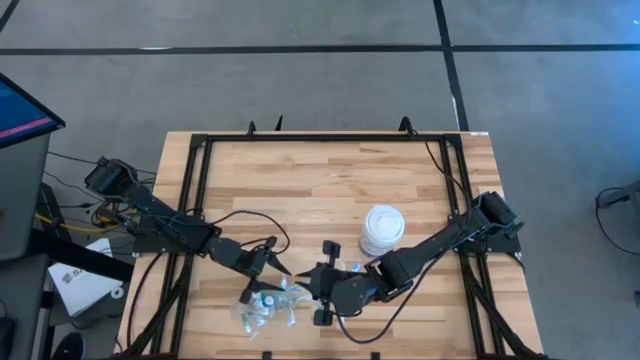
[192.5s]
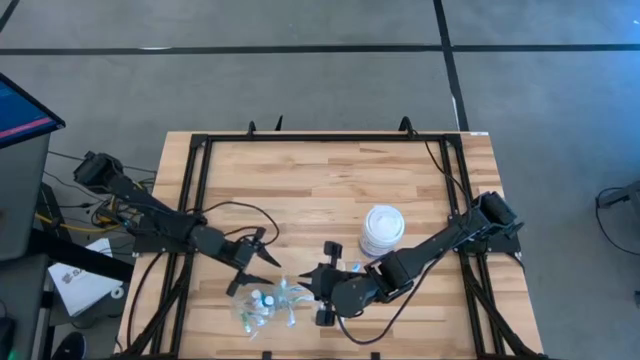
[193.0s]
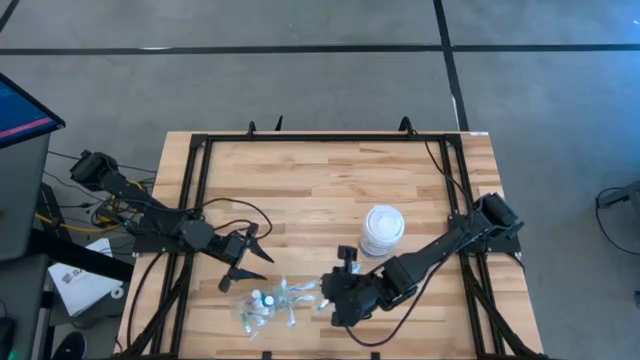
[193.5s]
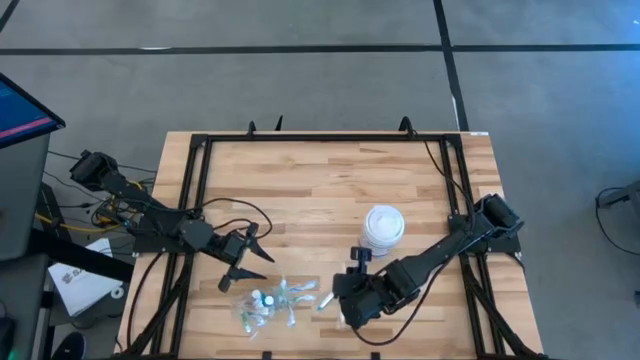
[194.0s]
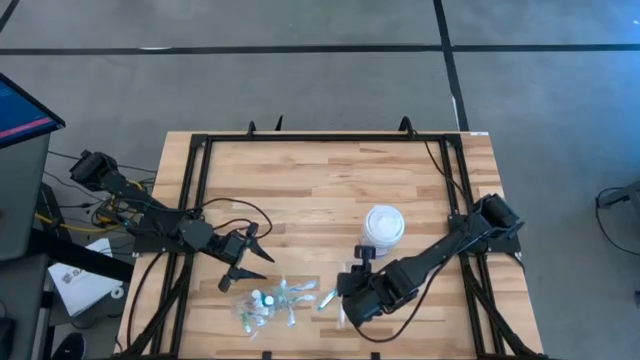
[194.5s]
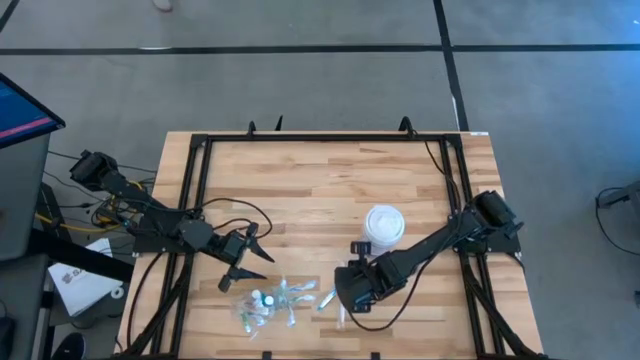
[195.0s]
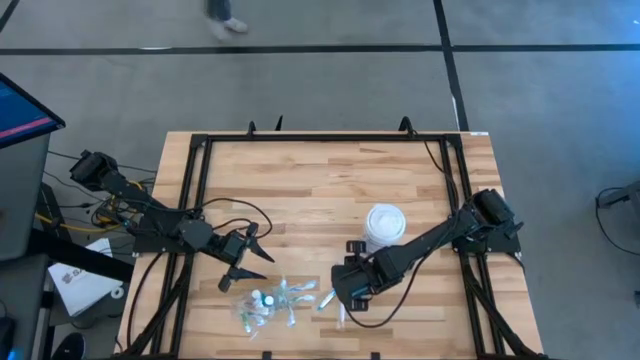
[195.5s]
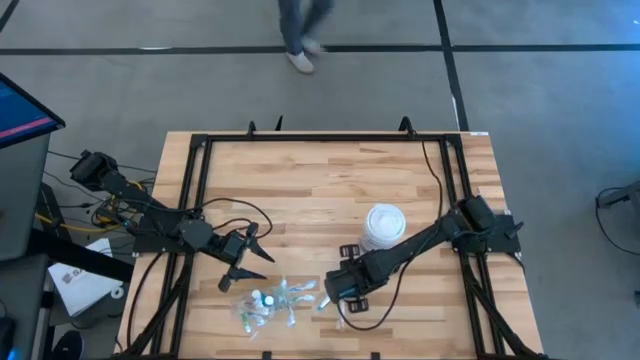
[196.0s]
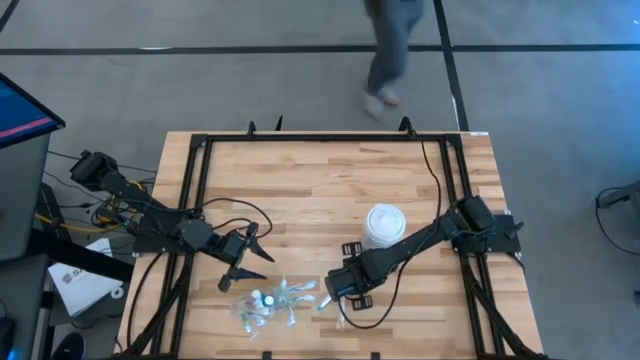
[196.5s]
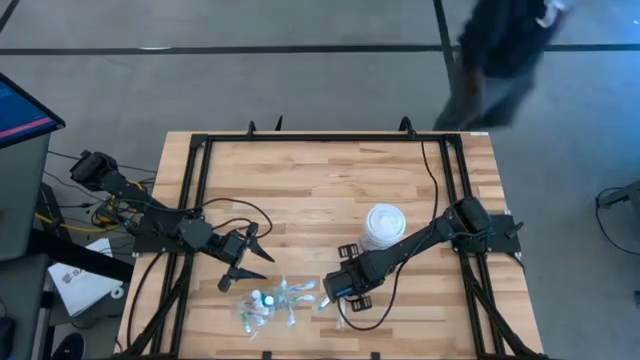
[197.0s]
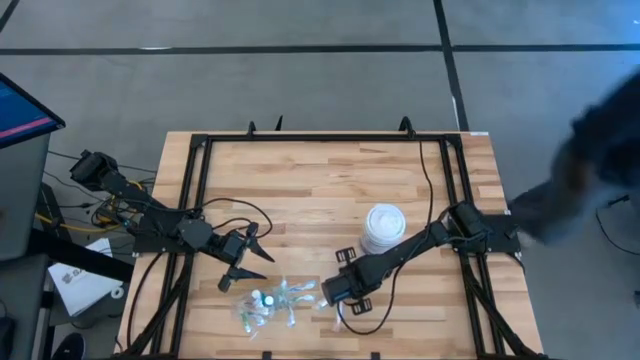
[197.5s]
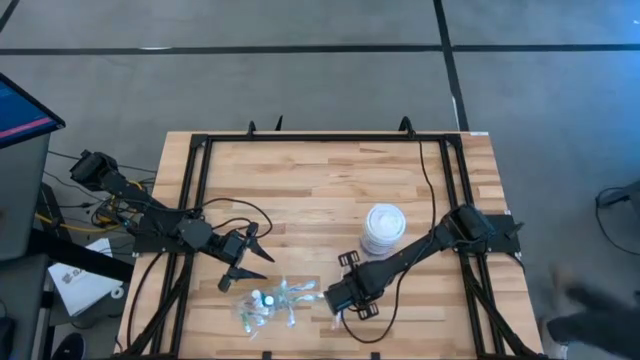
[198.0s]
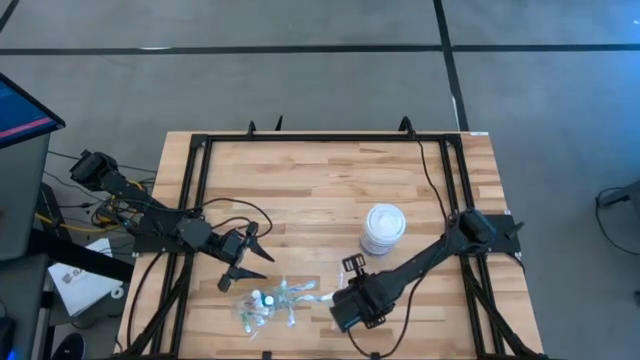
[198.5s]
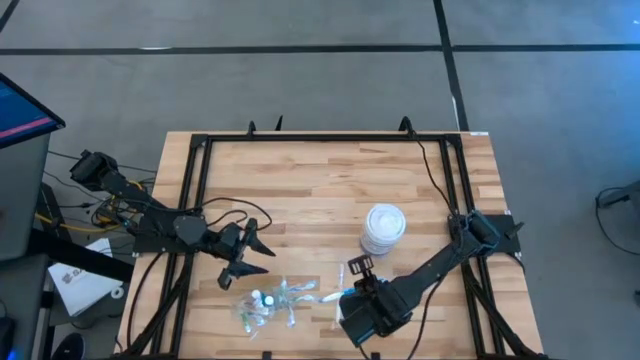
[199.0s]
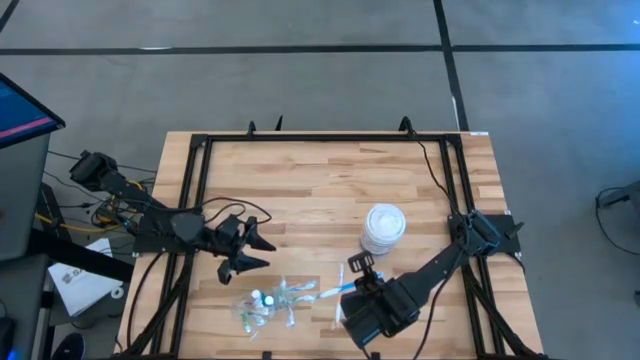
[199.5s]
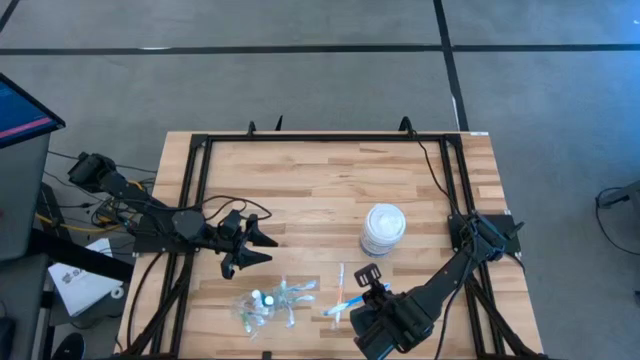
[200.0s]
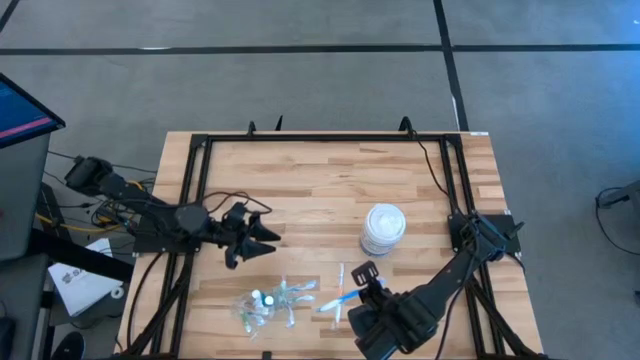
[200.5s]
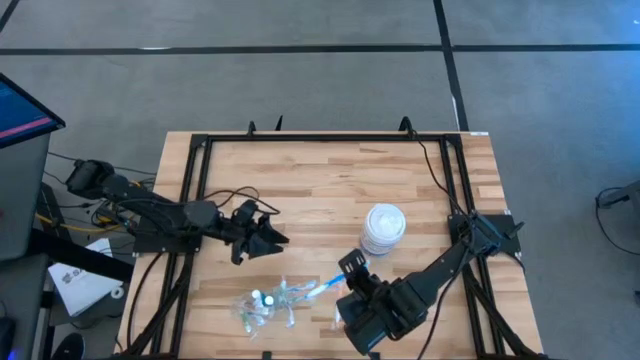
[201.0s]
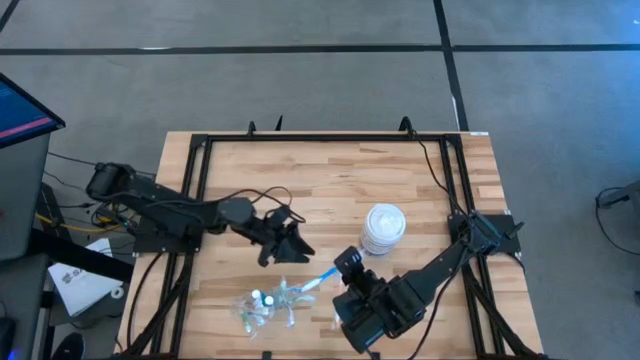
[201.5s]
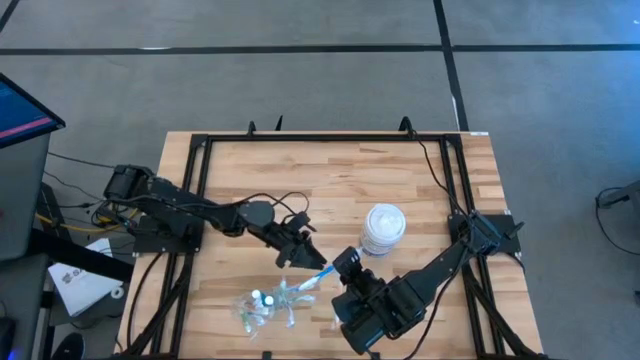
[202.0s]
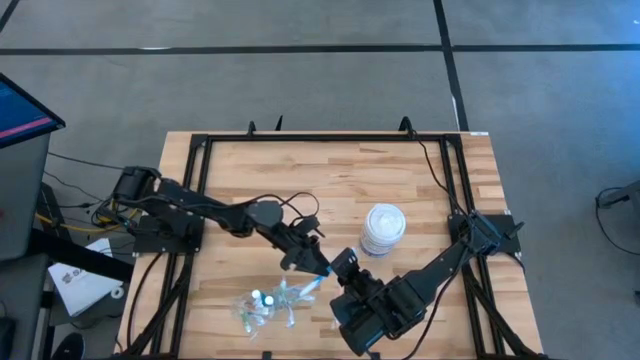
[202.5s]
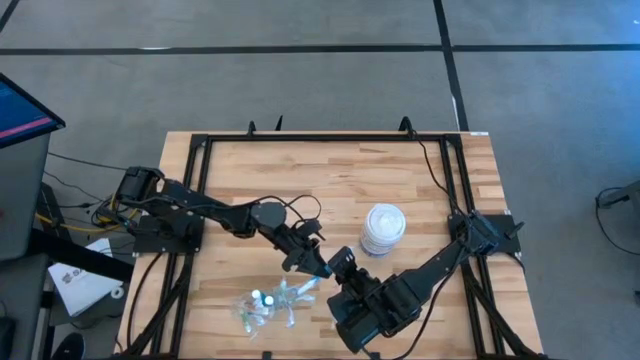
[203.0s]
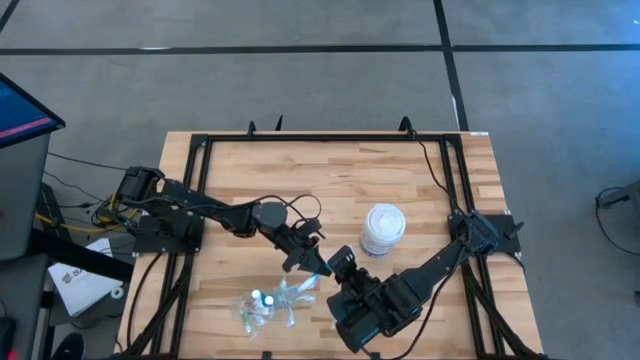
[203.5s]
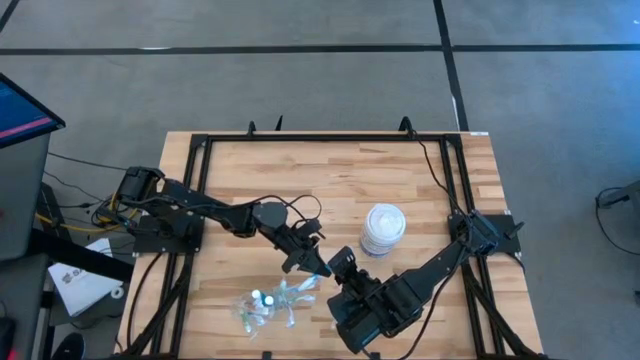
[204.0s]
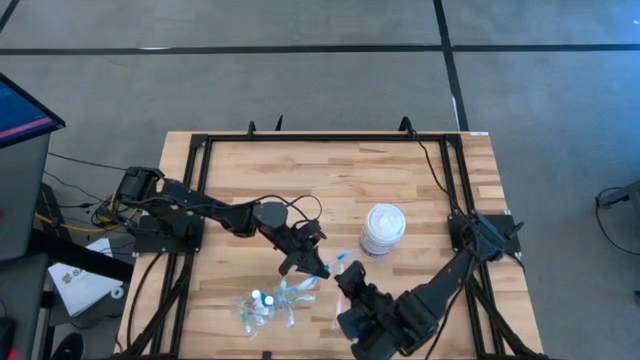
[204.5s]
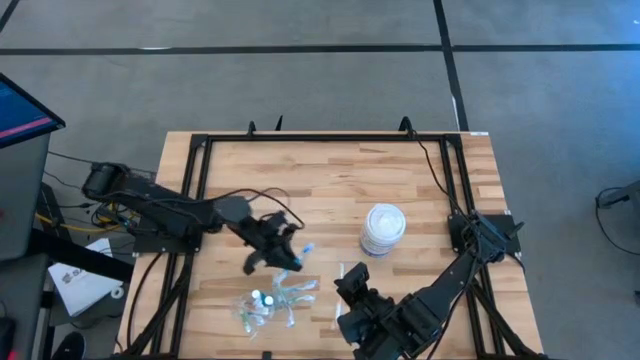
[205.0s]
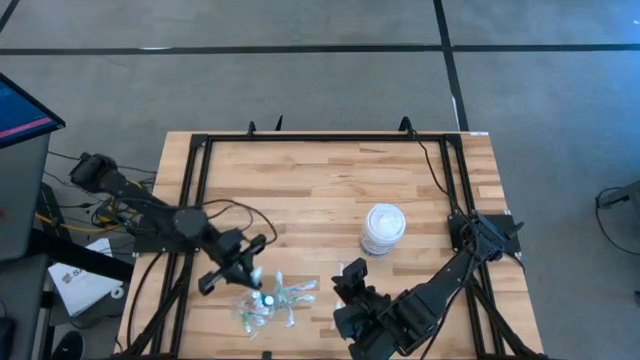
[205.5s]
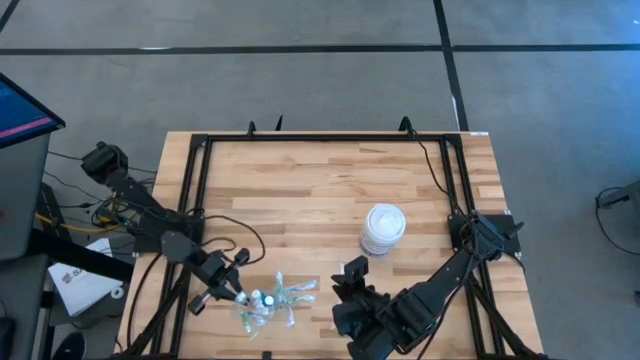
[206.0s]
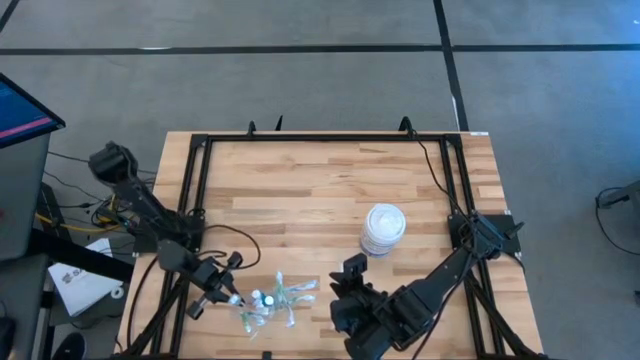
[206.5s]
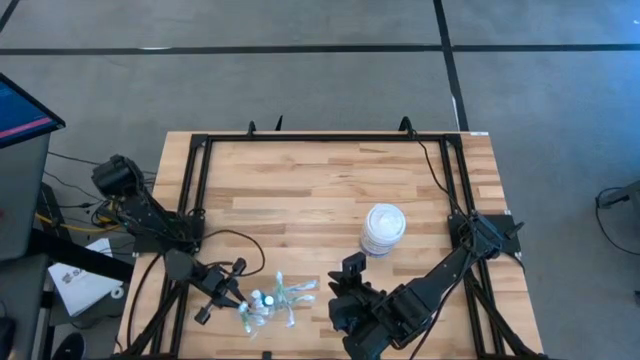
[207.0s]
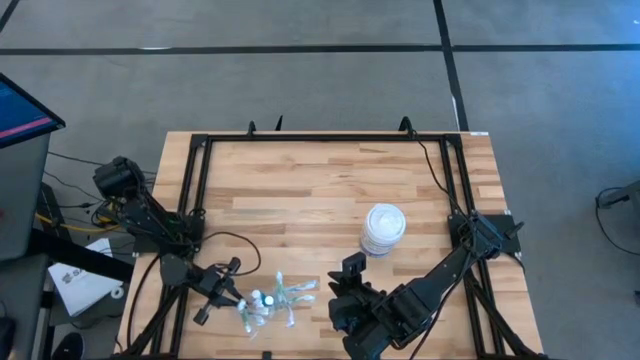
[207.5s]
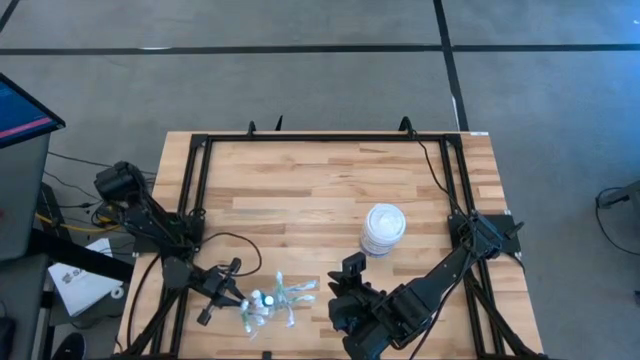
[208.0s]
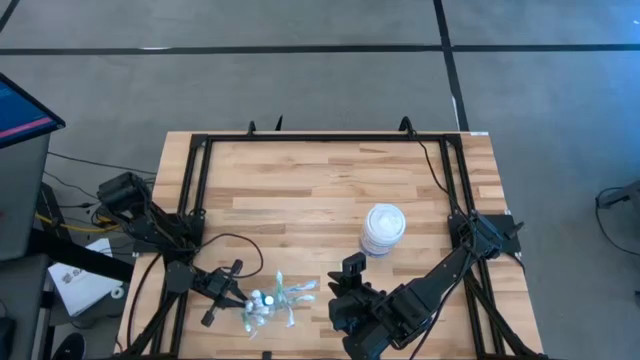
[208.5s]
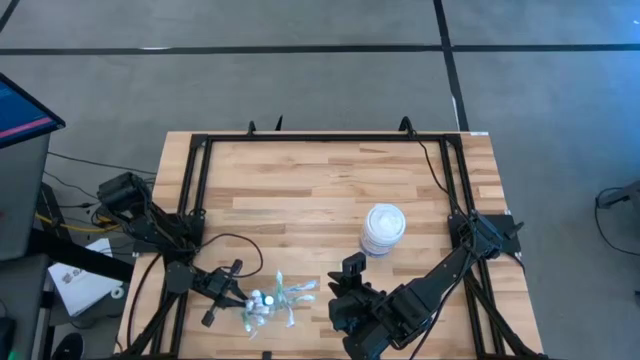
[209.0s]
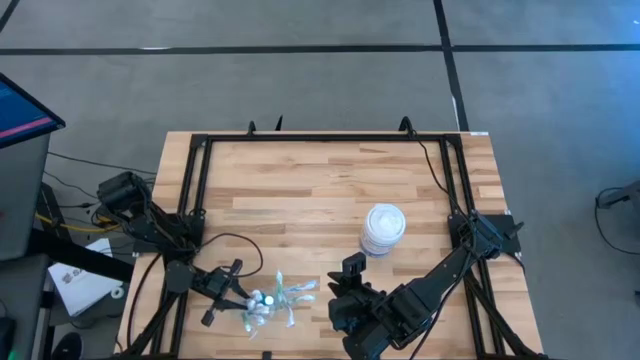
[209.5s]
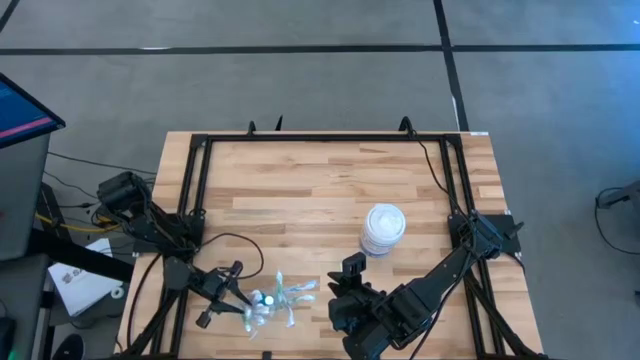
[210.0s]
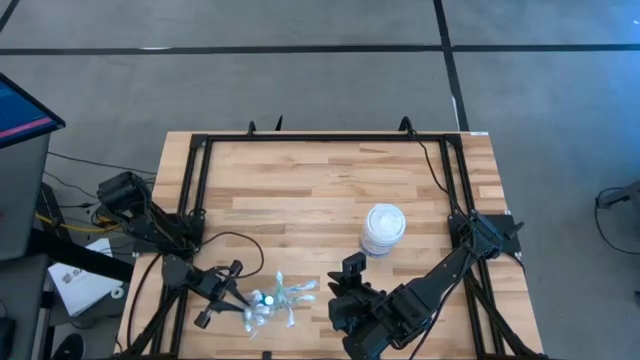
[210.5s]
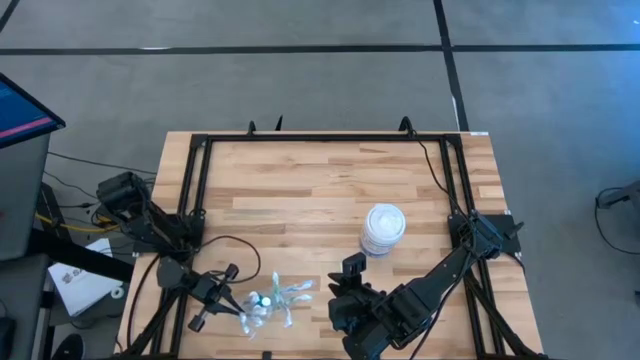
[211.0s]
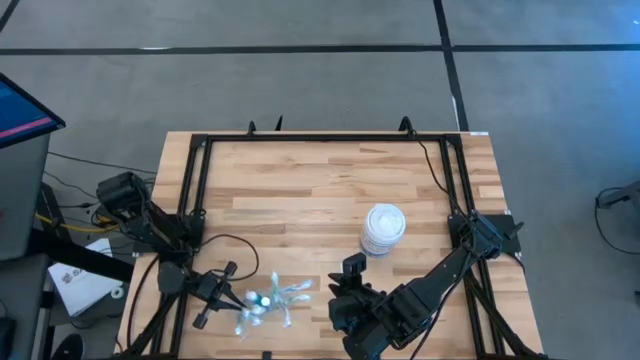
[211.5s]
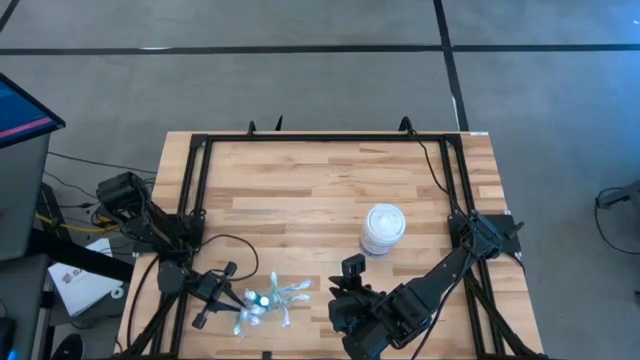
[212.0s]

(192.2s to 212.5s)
Task: Pick & Place toothbrushing station
Put the blue toothbrush into the transparent organizer
